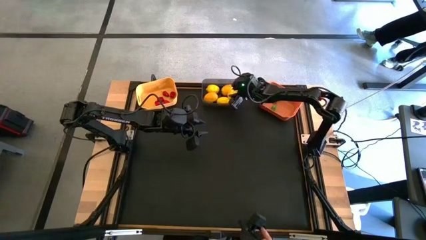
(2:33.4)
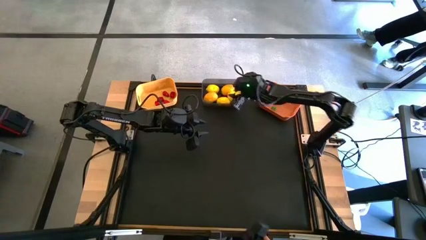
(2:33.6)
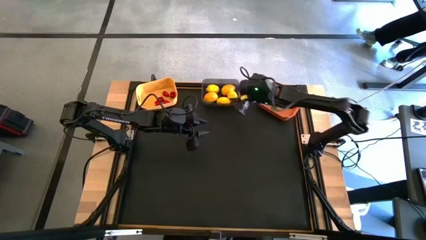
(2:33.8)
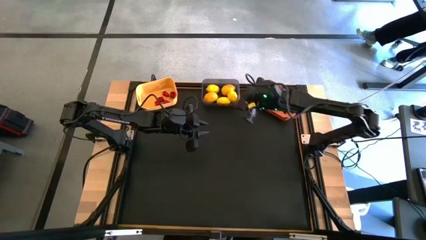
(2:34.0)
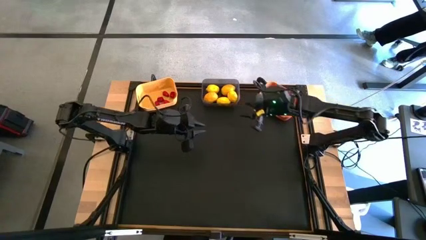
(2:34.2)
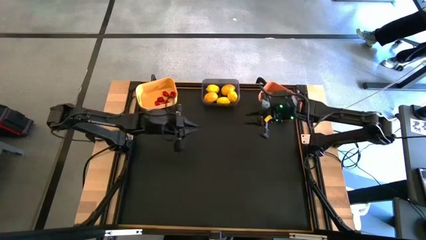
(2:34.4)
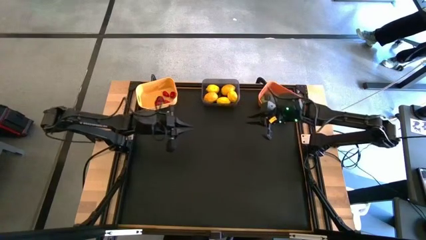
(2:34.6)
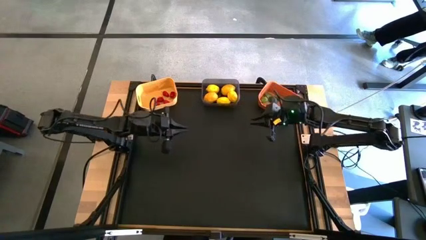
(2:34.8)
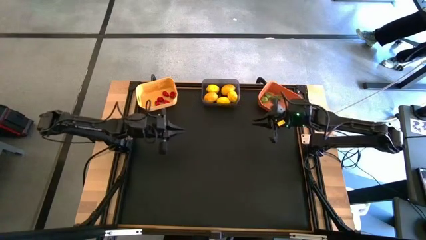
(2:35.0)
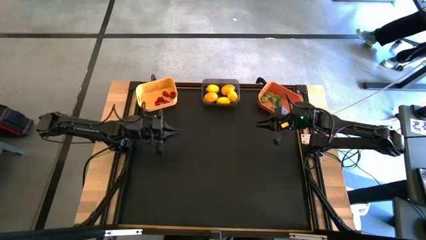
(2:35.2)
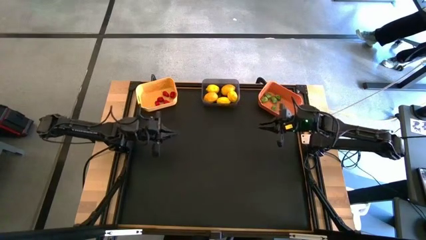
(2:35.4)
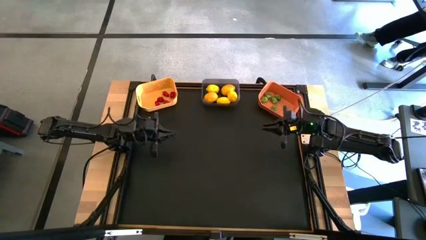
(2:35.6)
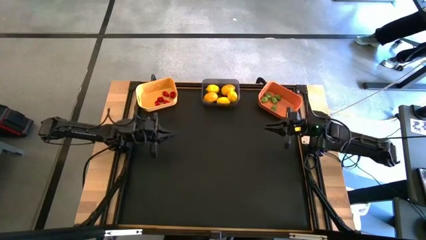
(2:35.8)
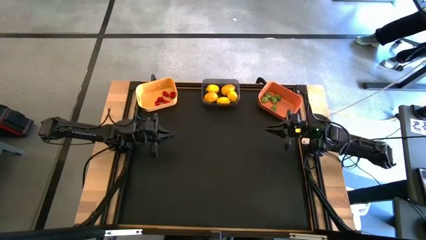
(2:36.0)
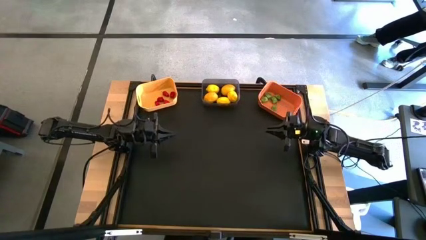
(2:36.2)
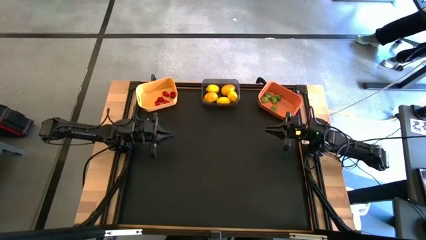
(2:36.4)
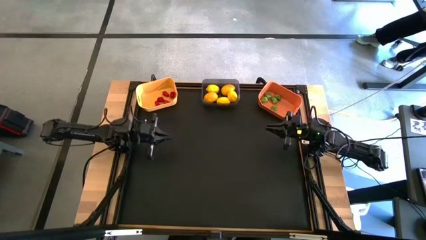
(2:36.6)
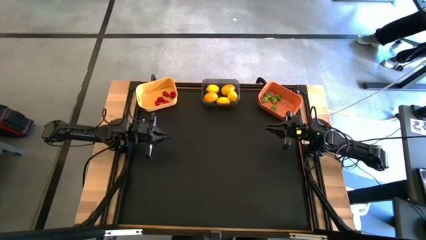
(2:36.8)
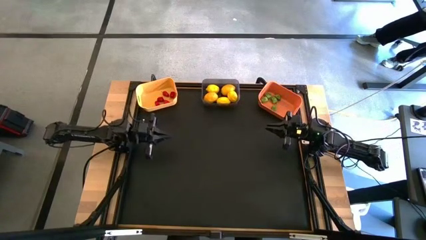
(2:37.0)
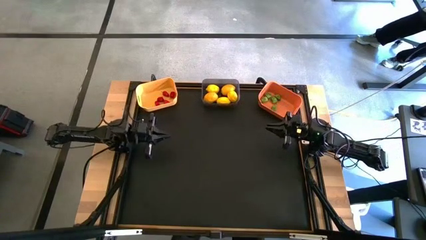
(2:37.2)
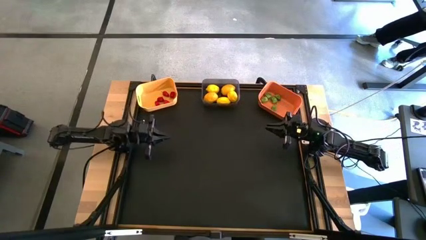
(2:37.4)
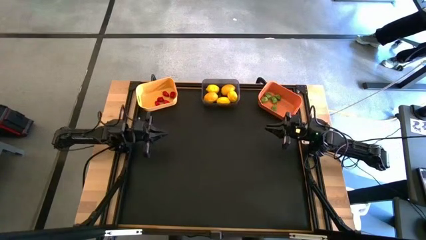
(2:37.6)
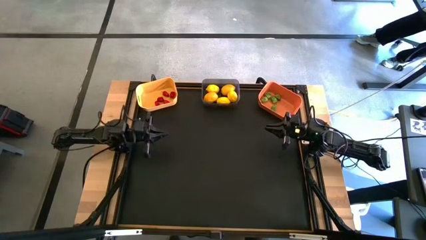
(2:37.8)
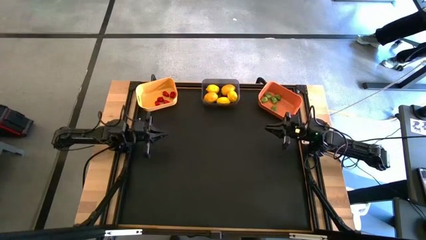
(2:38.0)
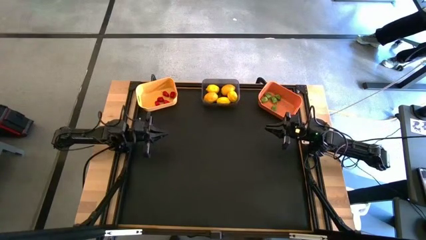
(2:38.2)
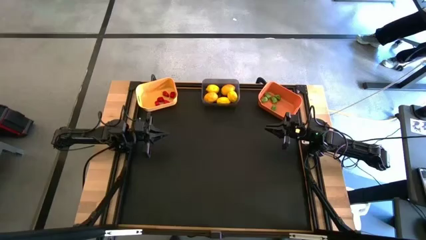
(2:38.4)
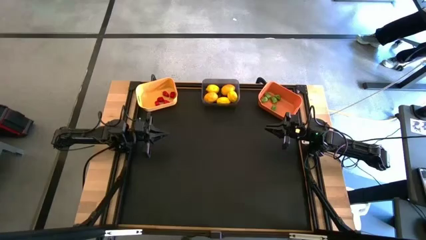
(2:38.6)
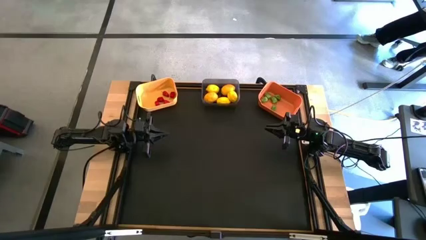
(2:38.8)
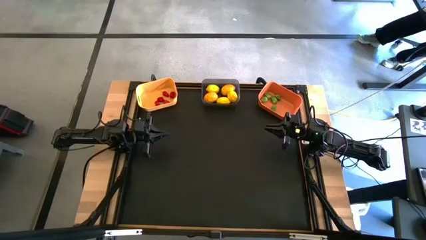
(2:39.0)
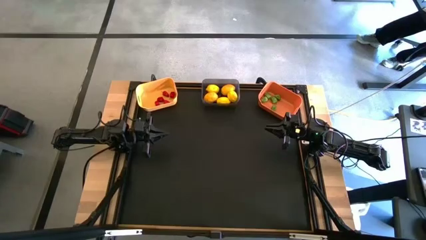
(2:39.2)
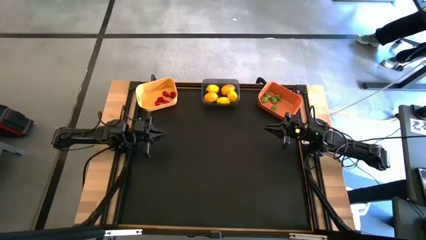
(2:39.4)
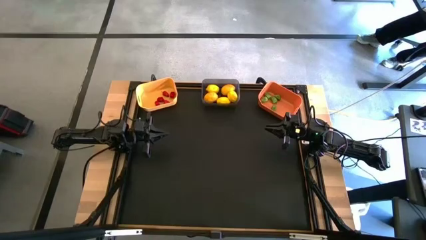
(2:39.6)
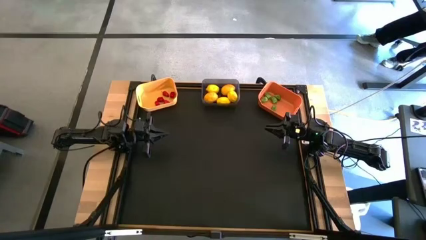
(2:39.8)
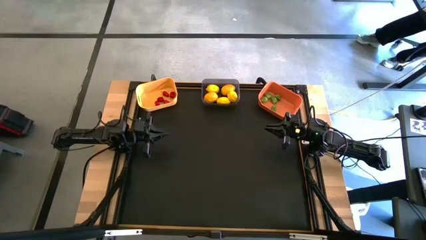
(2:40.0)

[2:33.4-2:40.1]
Task: Sort produce into baskets
Return to Home Position

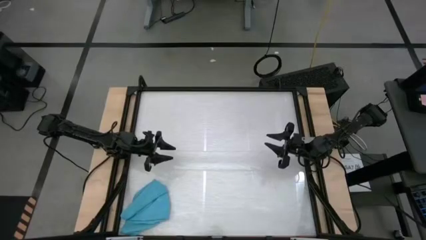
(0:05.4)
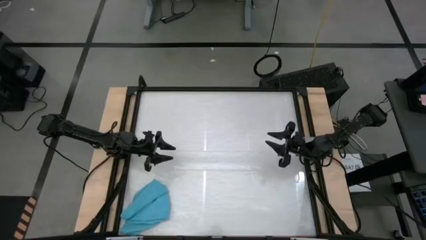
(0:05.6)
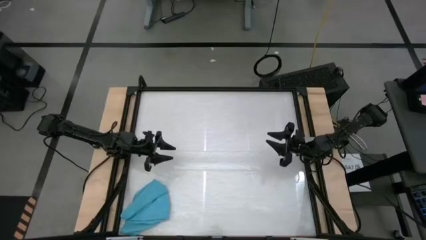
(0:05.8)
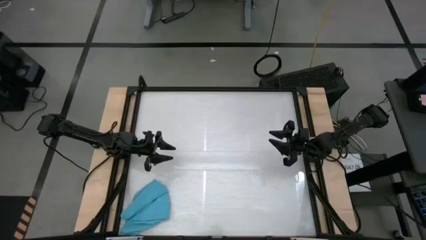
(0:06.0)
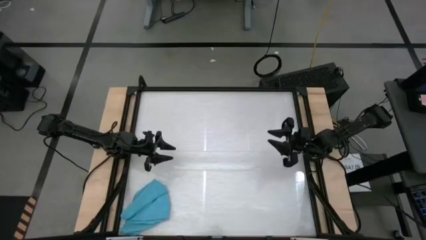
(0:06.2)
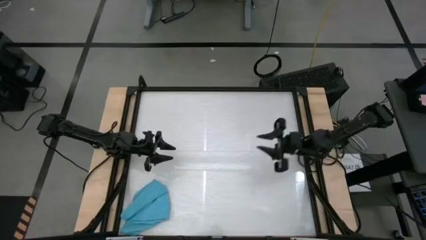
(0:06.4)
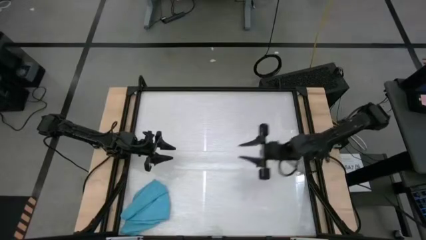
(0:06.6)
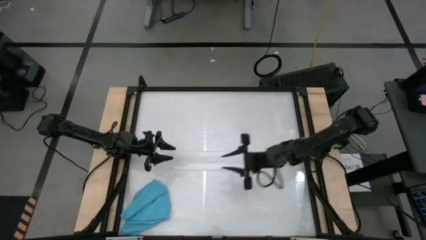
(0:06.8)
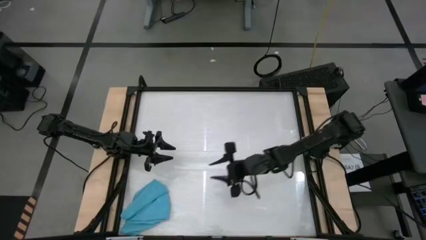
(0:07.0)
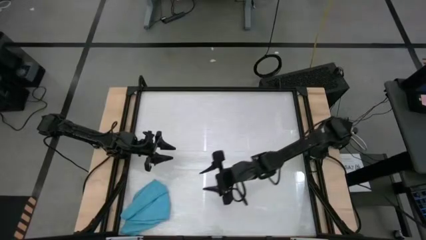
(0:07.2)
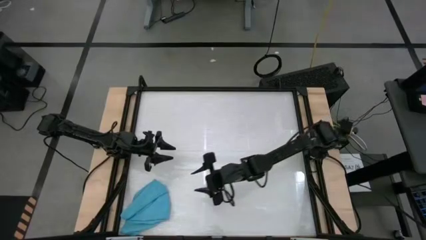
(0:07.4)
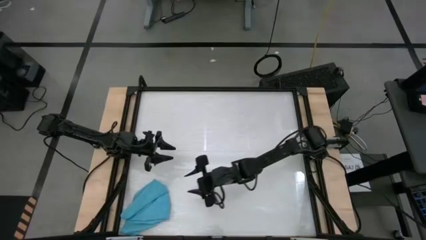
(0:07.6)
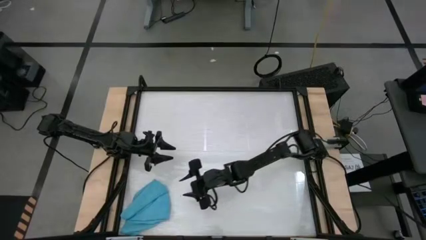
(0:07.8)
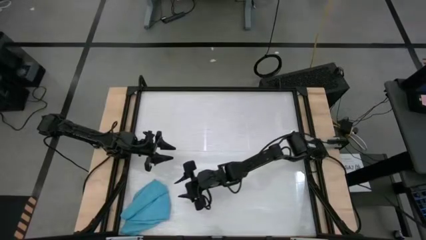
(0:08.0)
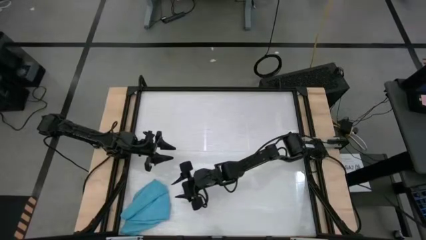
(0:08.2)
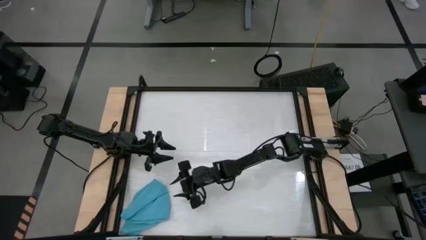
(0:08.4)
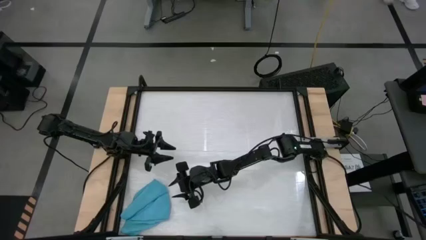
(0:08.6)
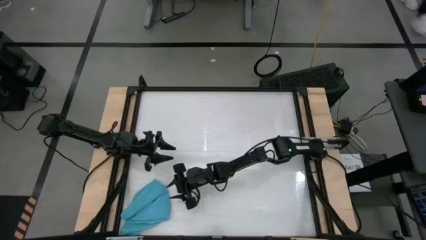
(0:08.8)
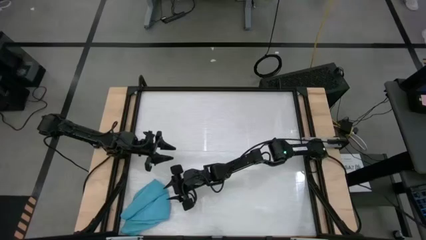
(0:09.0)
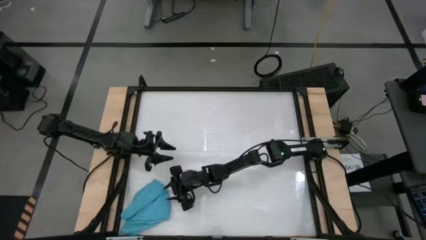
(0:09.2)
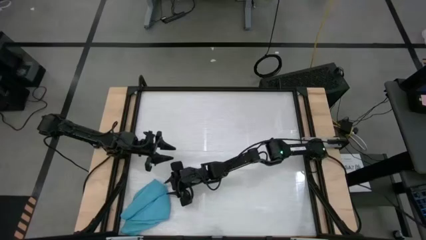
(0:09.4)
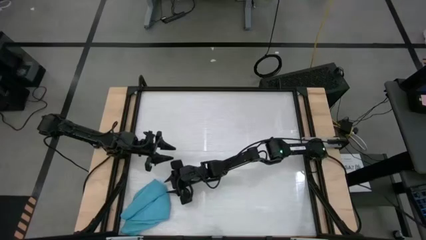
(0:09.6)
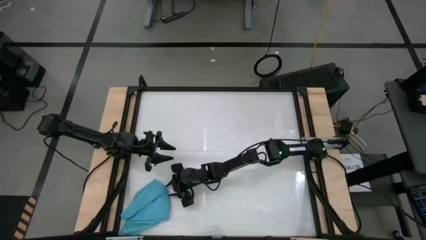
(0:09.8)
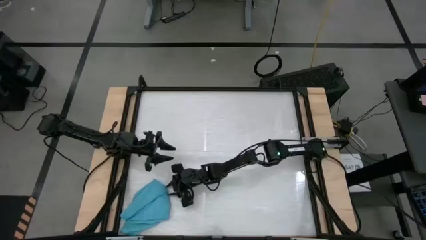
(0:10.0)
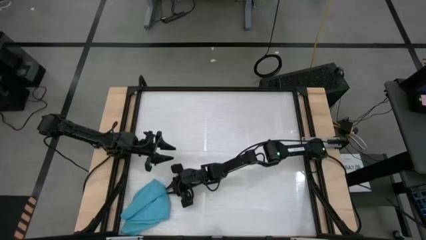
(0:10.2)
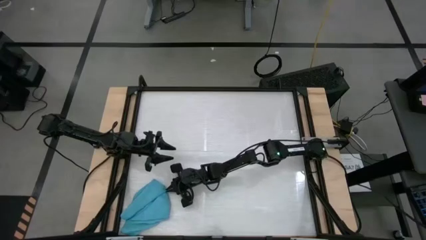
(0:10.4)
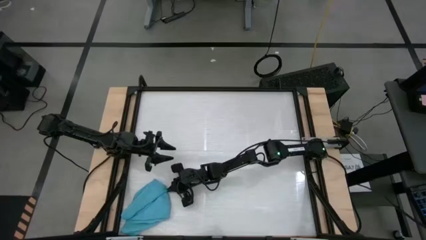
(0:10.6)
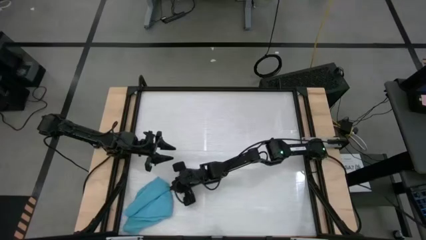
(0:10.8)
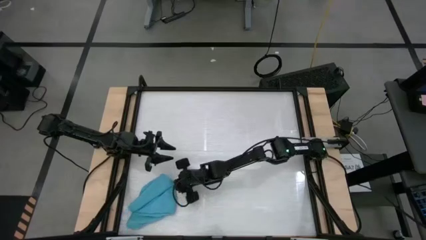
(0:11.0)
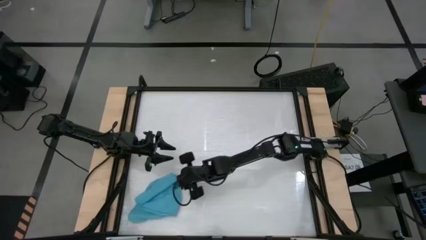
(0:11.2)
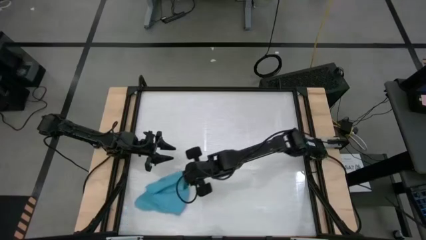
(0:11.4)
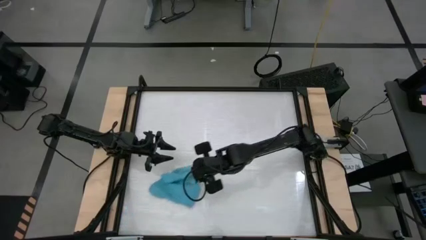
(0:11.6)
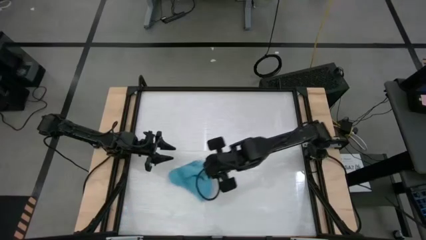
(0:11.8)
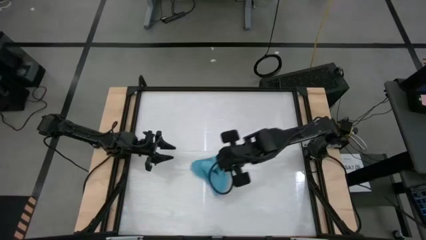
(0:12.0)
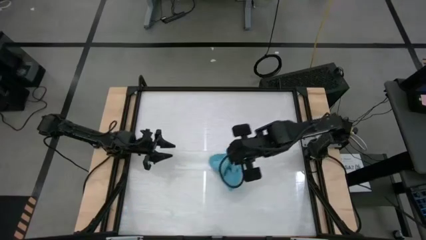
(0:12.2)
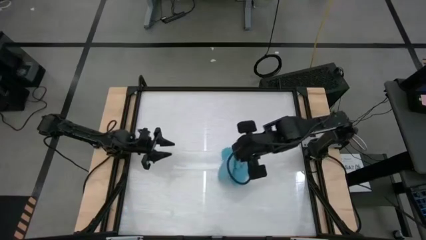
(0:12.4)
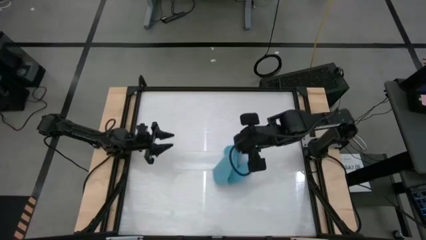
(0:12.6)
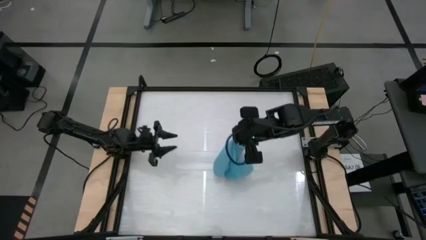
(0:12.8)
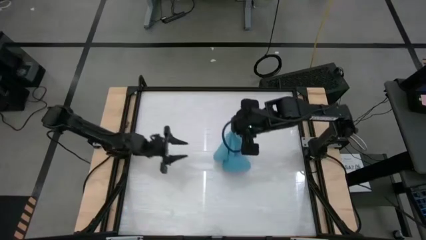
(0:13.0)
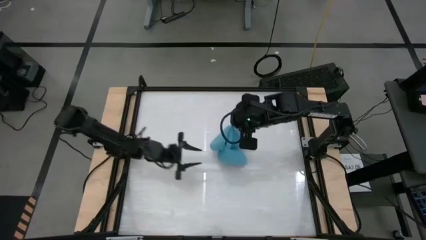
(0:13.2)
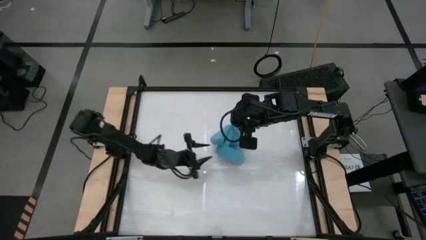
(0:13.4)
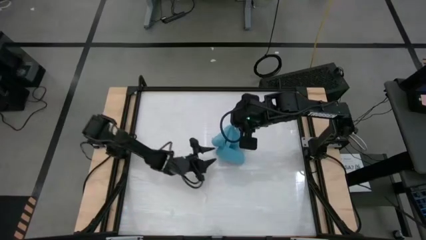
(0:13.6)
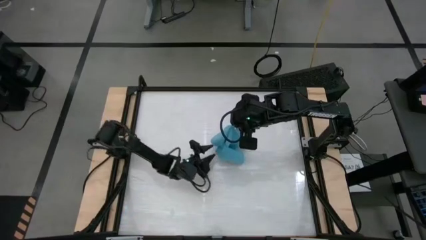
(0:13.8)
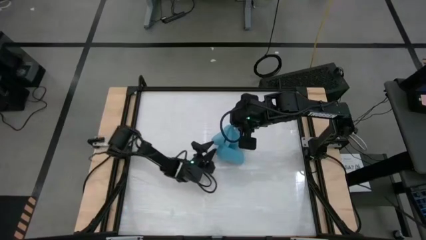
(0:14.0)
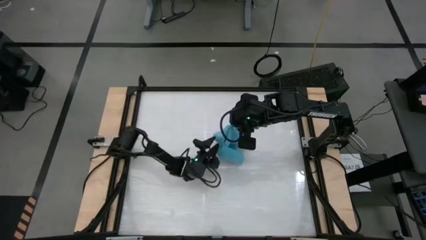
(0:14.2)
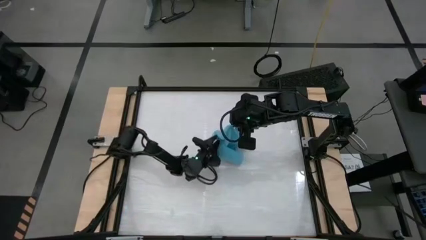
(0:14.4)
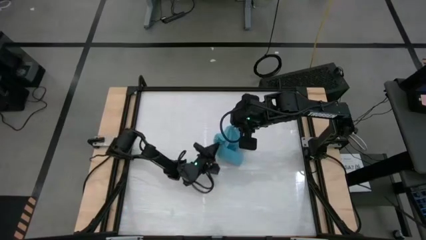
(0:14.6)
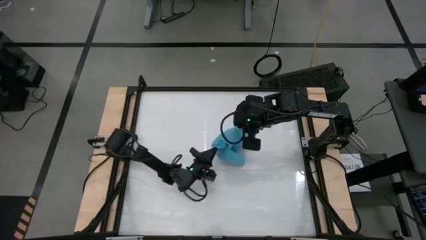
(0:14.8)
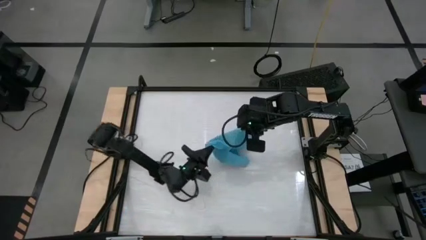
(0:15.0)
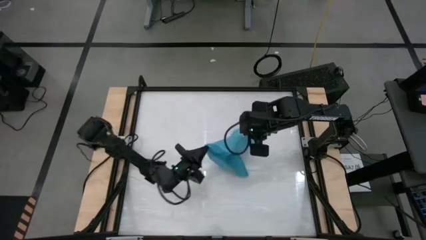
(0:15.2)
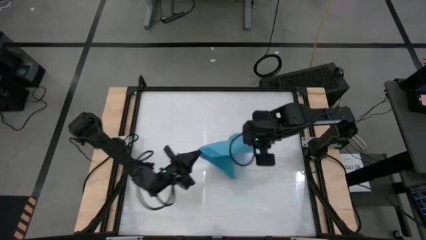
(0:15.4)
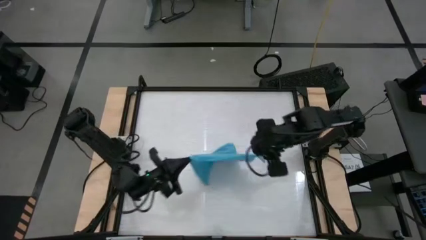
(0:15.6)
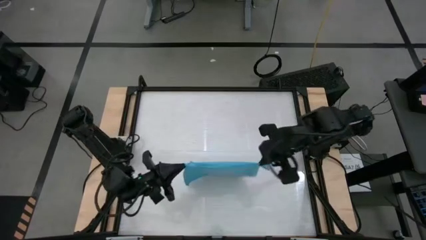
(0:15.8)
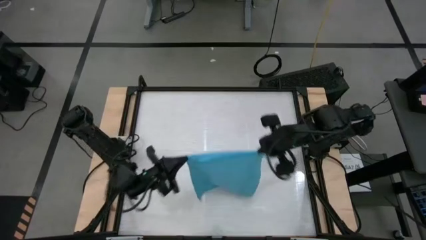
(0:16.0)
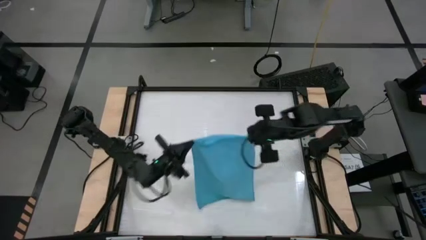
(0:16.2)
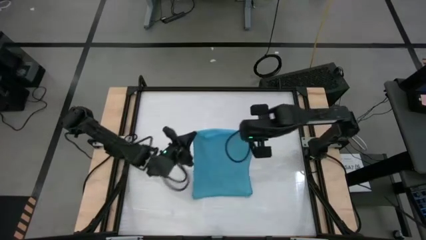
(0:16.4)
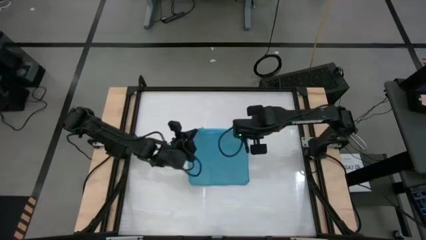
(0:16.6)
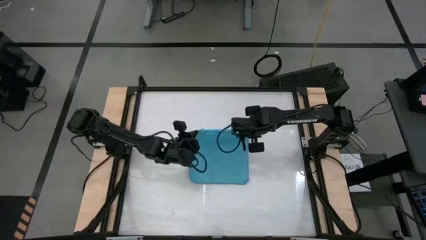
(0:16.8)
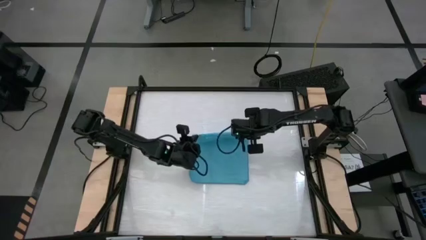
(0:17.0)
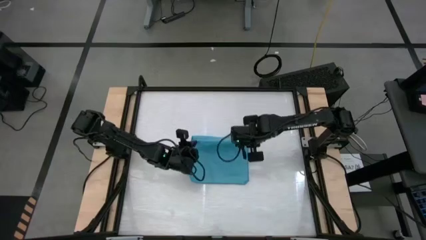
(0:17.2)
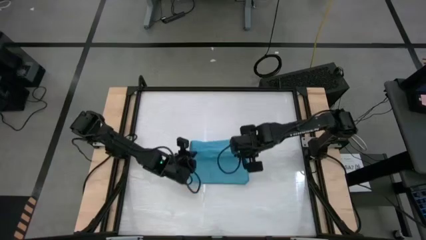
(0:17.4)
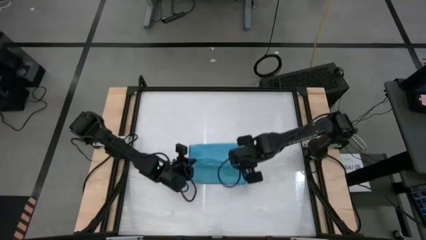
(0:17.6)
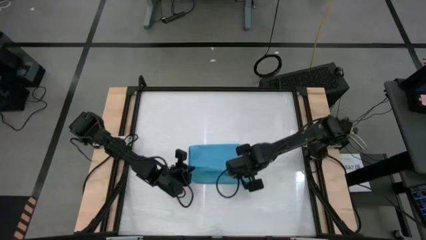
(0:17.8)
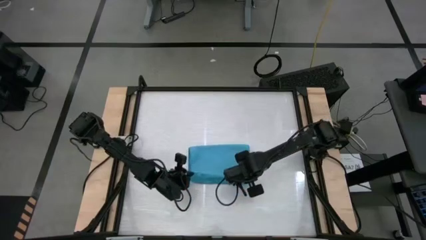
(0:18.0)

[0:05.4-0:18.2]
Task: Roll towel
Fold the blue towel
